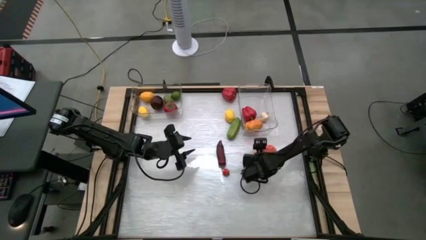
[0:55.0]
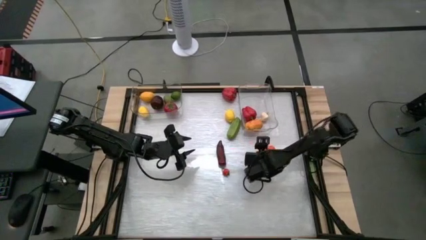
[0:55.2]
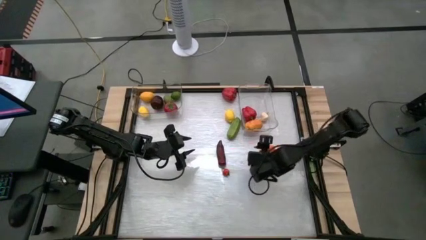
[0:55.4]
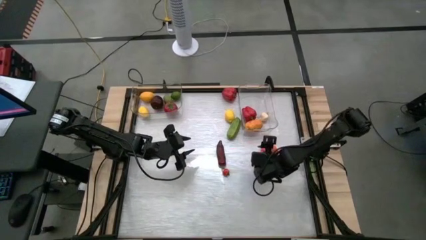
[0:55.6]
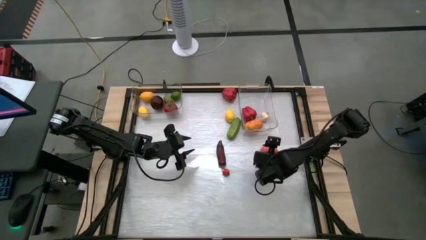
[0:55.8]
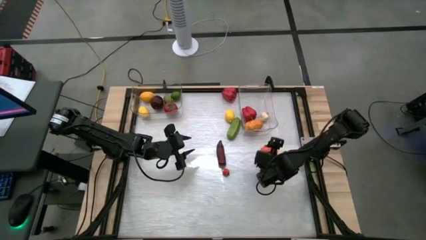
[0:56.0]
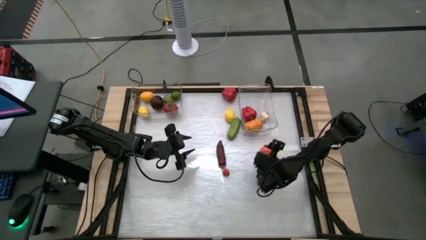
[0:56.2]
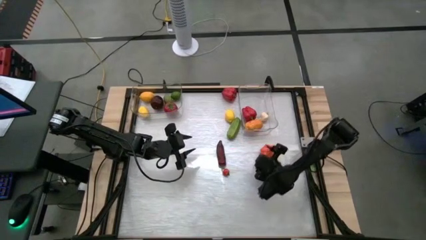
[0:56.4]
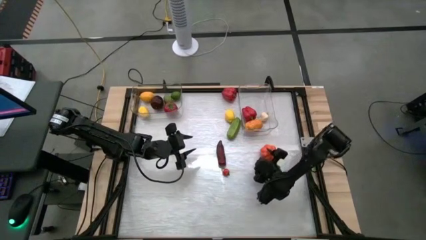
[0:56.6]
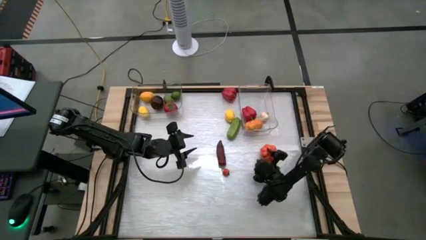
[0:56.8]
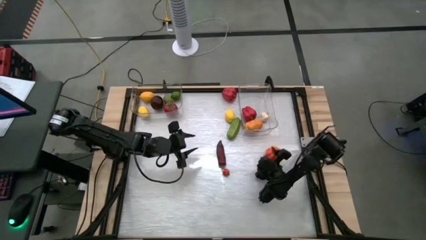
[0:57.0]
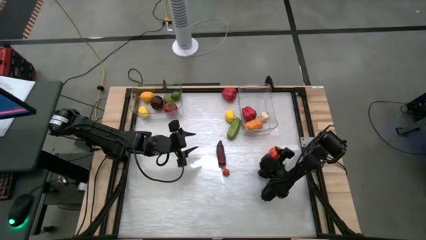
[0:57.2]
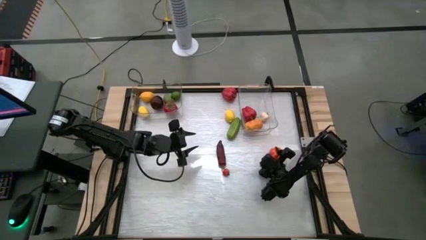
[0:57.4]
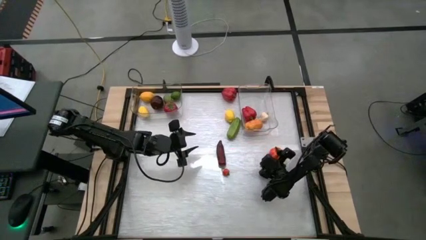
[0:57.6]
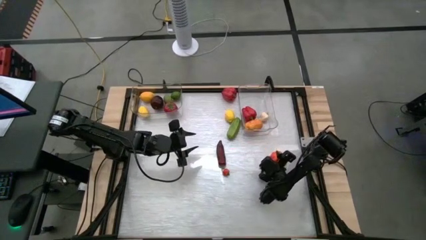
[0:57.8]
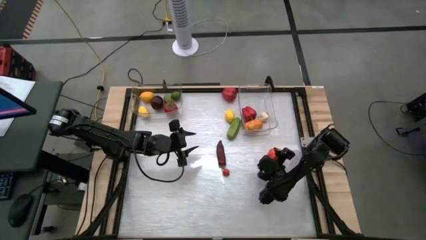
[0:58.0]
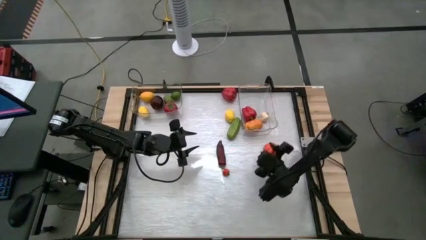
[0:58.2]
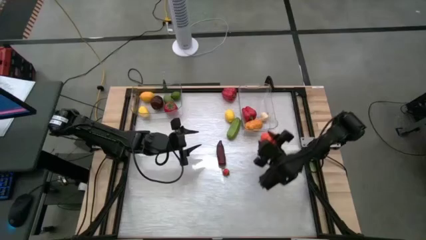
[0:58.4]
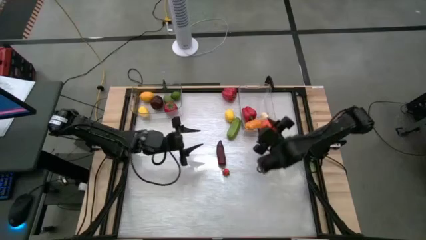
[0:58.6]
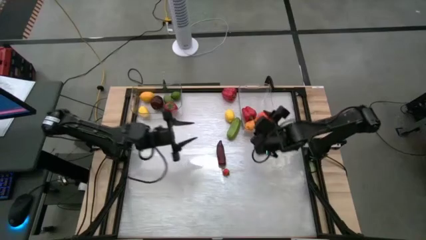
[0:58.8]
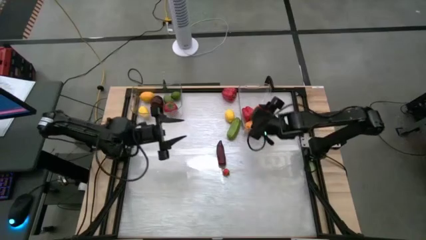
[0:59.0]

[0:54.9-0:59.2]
Task: Sort produce into baskets
Put the orange pumpkin into the left transparent bin

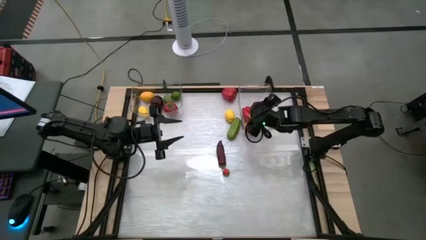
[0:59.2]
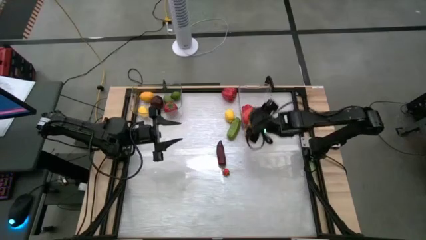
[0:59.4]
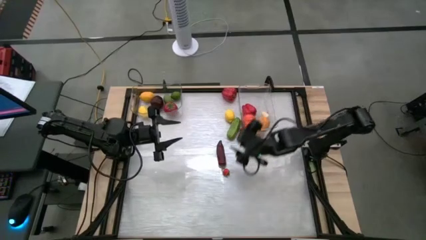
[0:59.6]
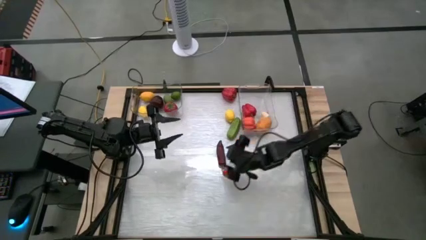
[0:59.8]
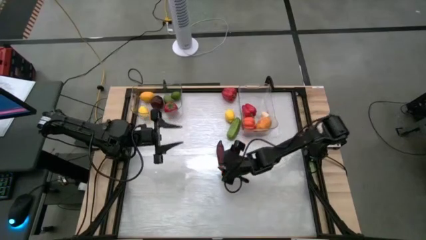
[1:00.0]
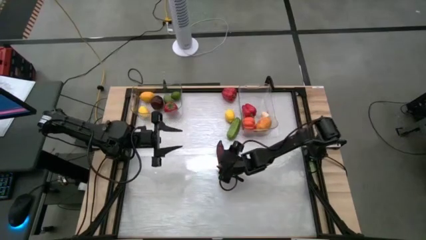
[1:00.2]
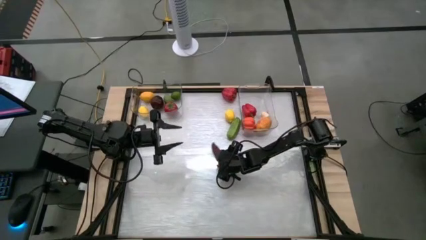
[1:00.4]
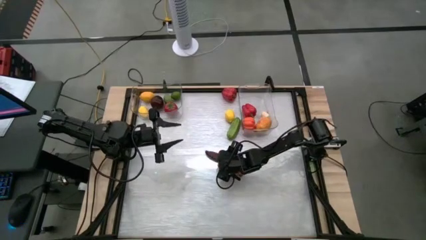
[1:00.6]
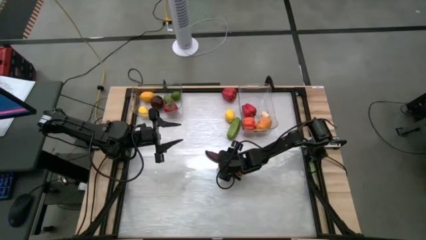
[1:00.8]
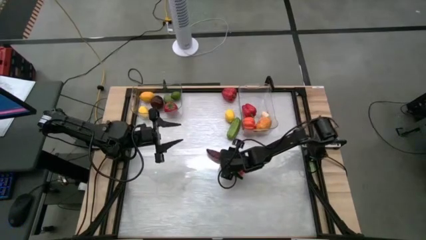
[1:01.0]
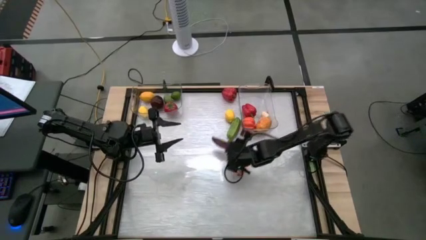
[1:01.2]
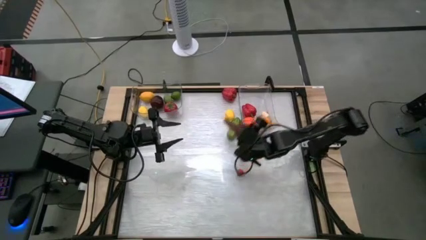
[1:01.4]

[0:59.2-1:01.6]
Put the red pepper into the right transparent bin

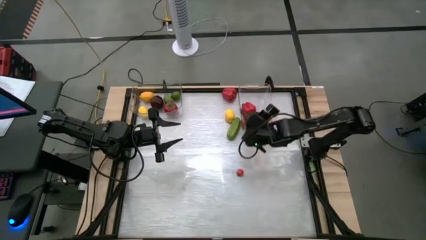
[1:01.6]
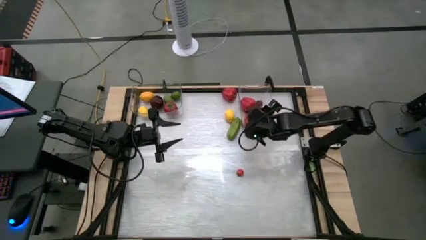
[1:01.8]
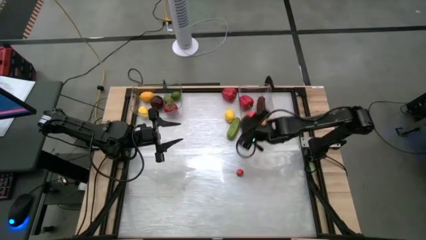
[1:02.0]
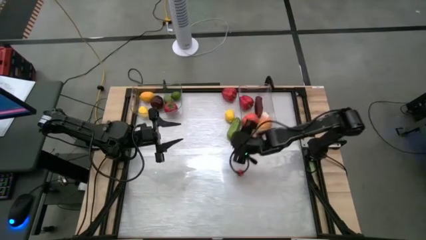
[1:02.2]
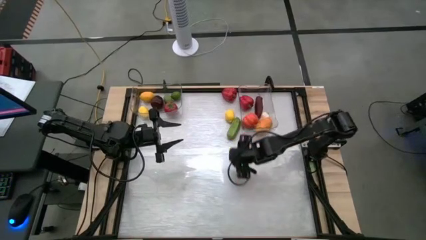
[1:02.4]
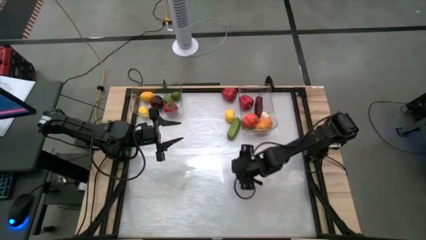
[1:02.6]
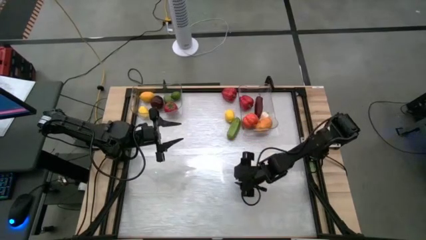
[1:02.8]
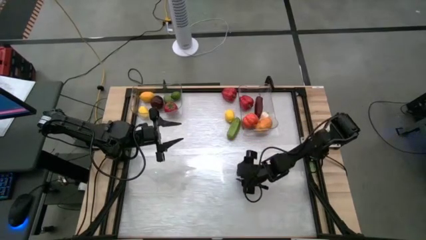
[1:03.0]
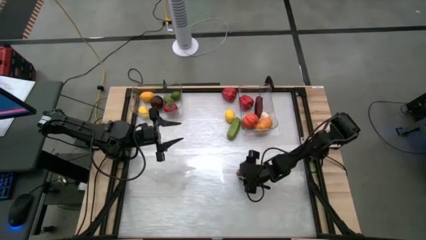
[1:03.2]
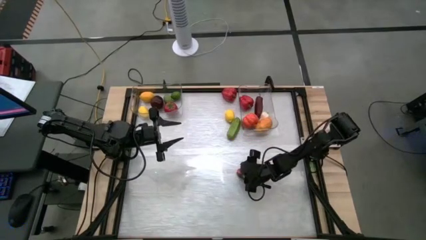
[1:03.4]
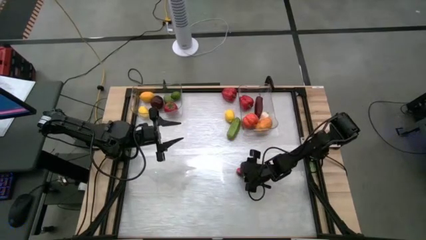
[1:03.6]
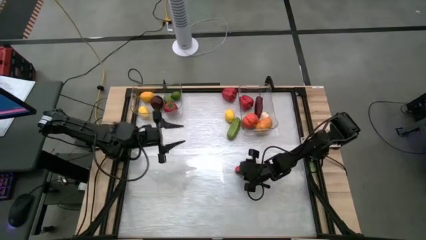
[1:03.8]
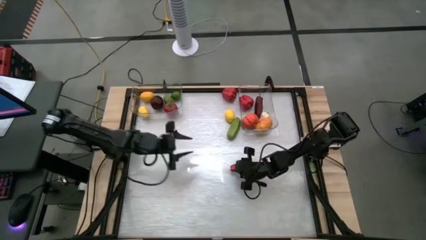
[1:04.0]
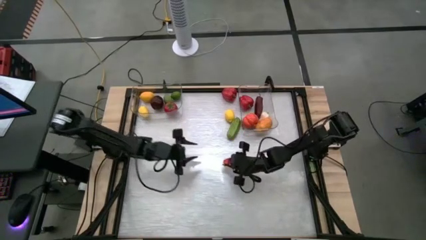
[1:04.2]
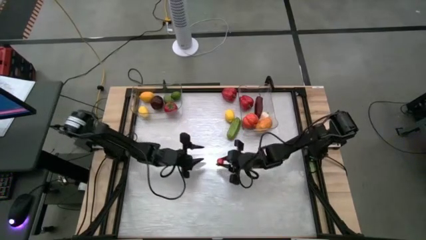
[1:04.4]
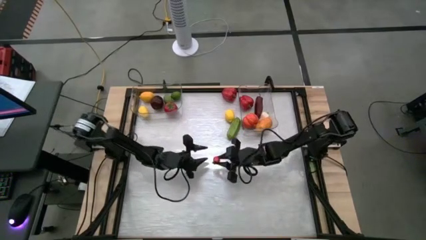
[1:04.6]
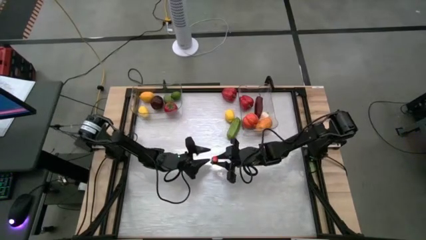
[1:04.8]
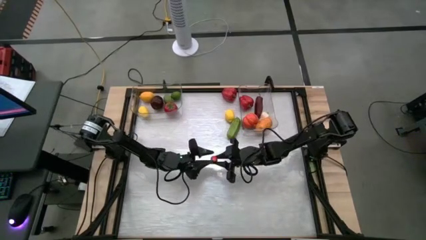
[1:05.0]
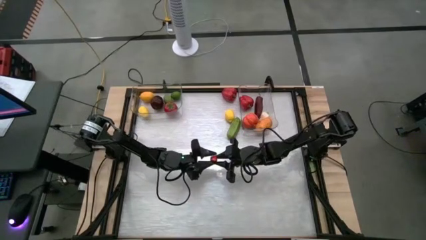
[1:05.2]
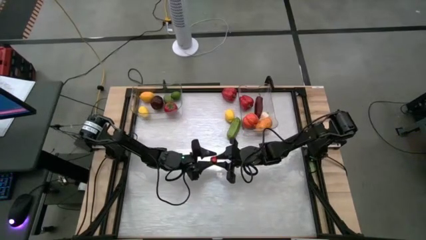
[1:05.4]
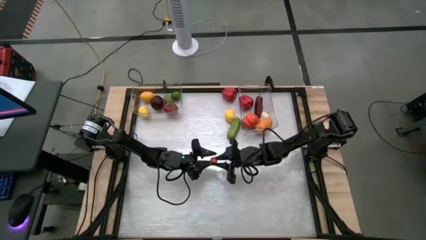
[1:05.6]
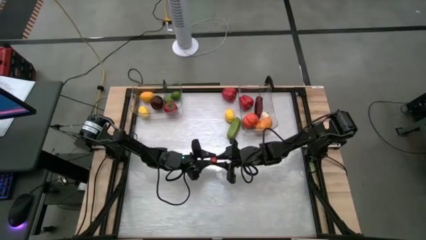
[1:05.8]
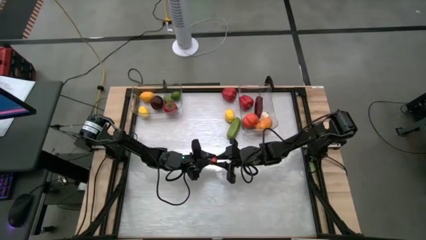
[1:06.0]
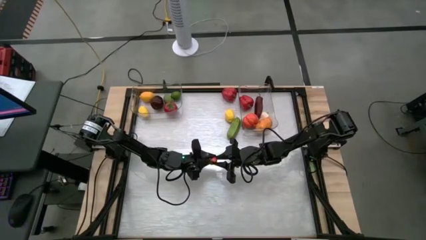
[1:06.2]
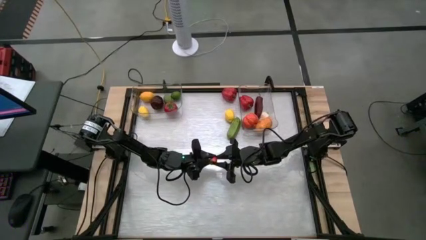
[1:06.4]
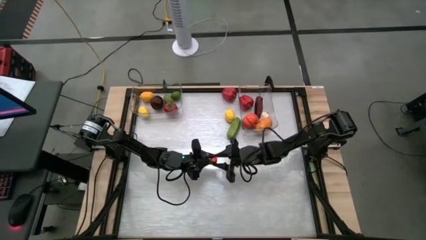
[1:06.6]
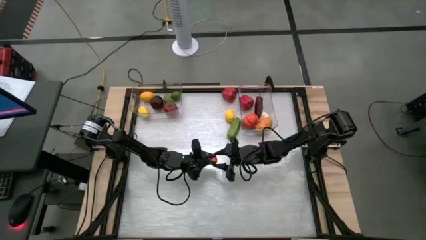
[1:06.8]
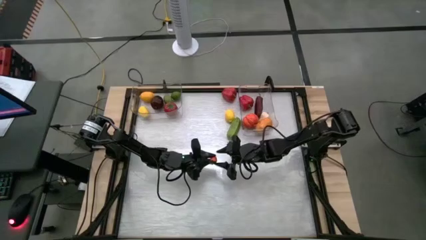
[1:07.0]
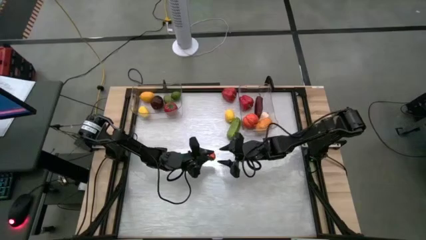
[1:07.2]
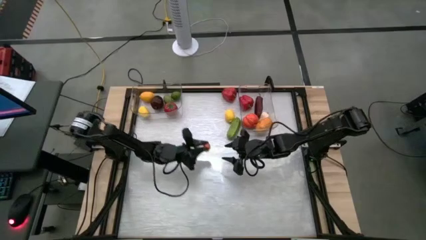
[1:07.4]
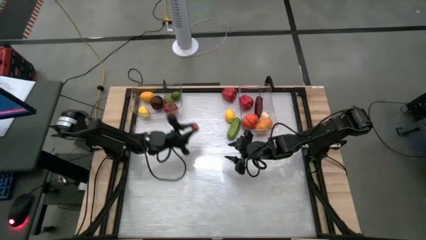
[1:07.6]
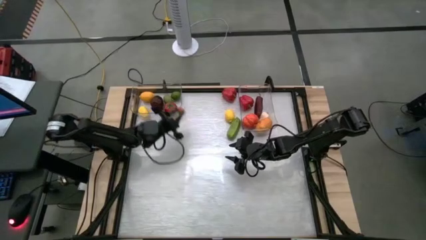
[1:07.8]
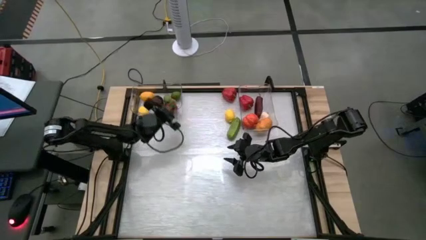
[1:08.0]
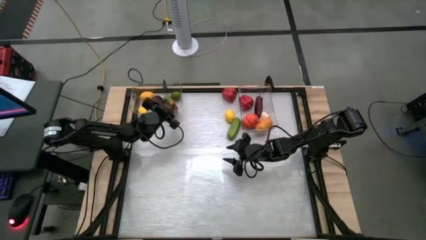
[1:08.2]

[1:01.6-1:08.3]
Put the red tomato into the left transparent bin

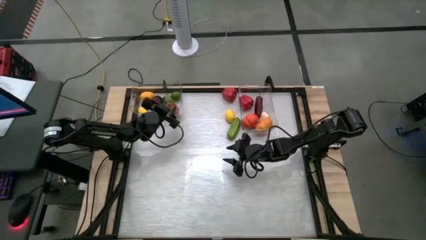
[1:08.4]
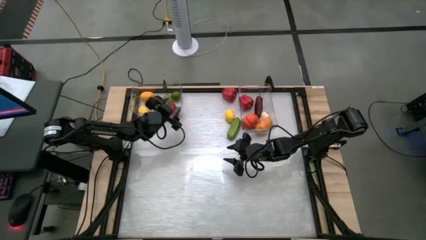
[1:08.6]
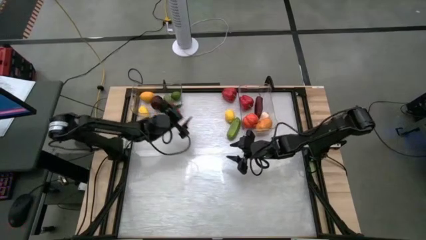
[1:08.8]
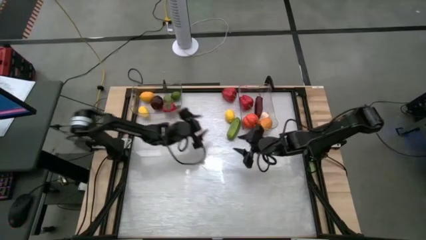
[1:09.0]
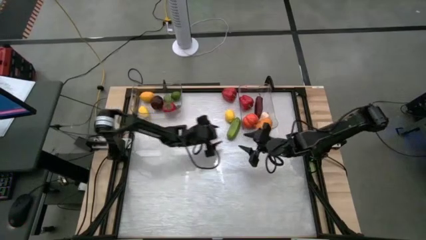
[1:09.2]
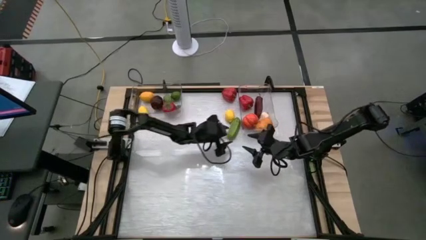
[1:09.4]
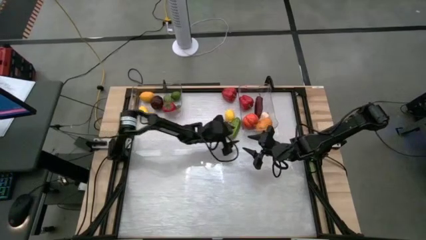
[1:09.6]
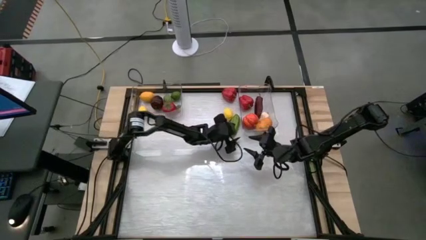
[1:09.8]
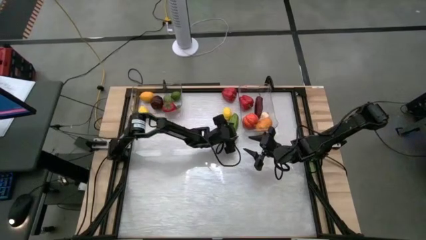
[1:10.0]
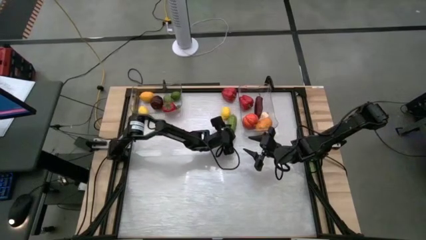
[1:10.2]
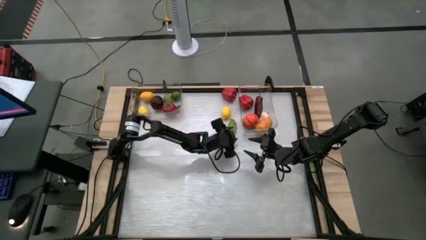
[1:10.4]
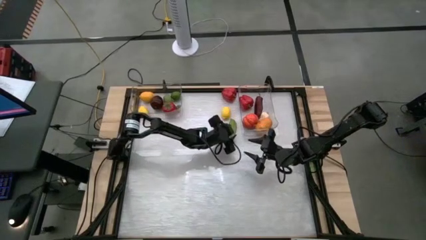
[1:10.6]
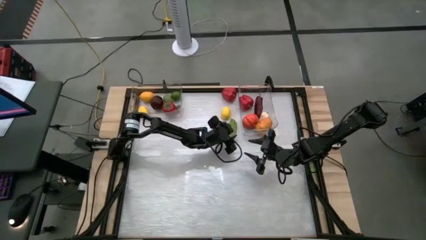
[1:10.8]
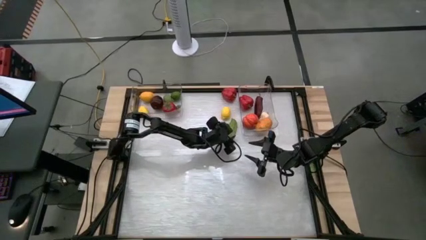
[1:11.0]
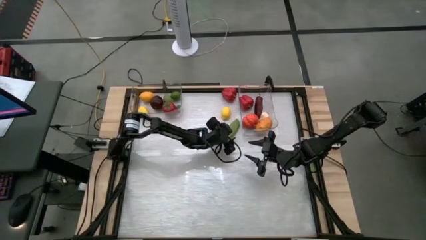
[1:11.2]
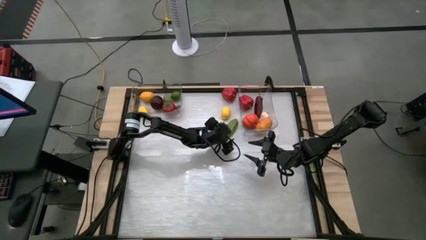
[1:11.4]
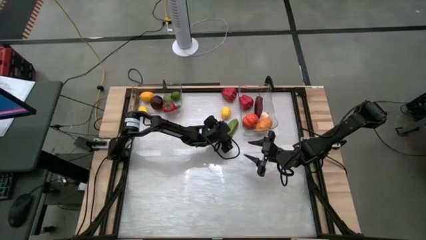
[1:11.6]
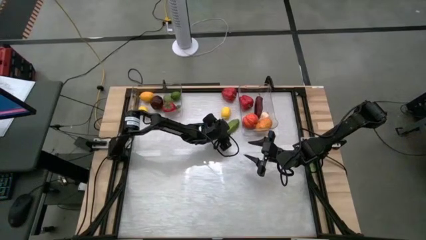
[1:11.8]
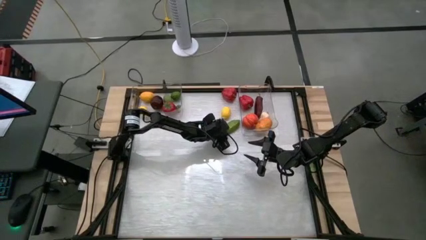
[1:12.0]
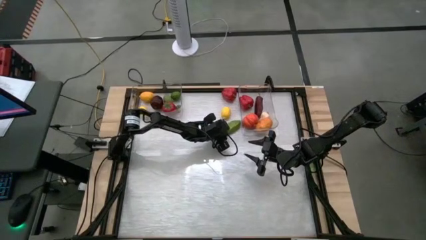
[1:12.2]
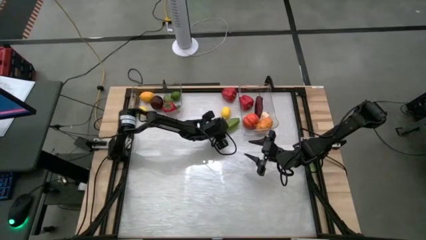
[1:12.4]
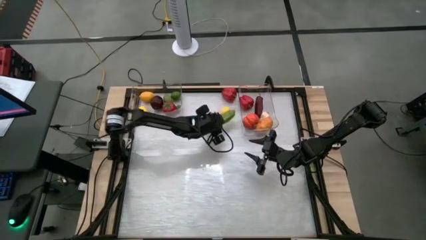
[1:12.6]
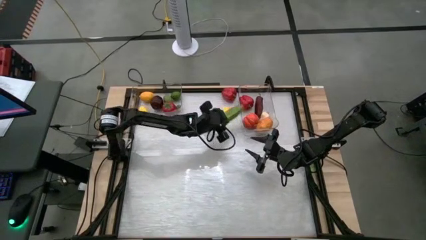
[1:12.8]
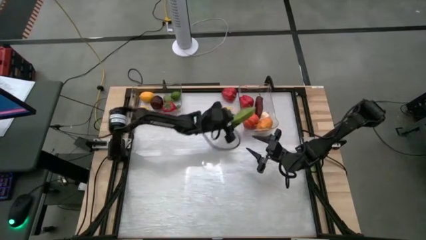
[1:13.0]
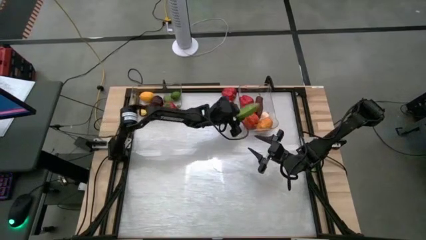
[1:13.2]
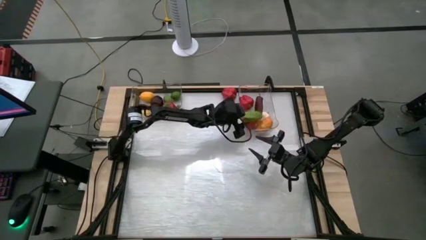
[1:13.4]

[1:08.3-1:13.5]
Put the green cucumber into the right transparent bin
